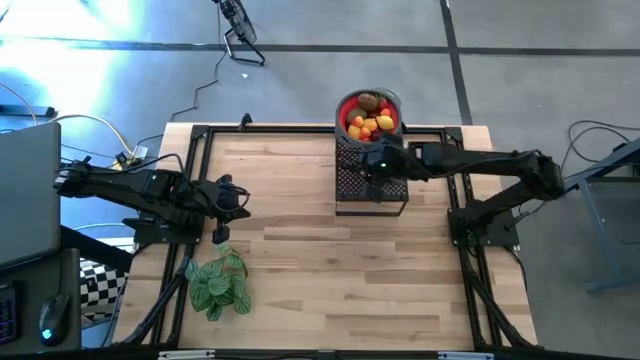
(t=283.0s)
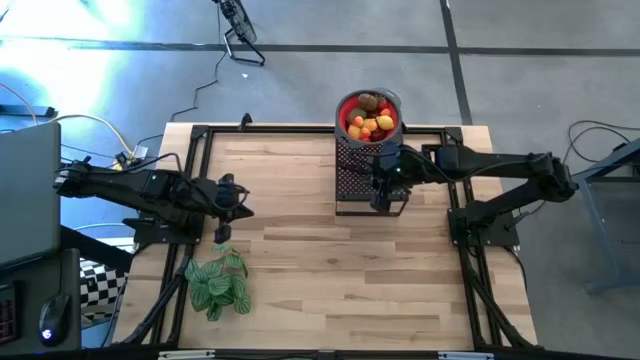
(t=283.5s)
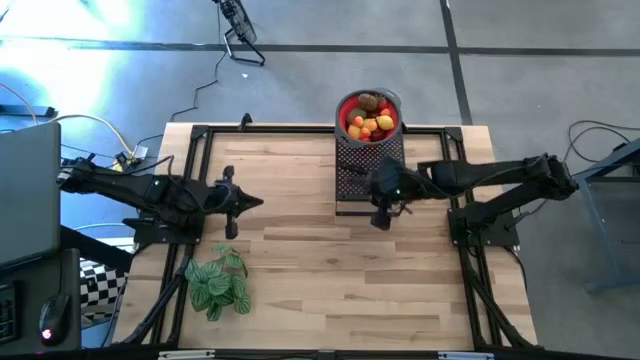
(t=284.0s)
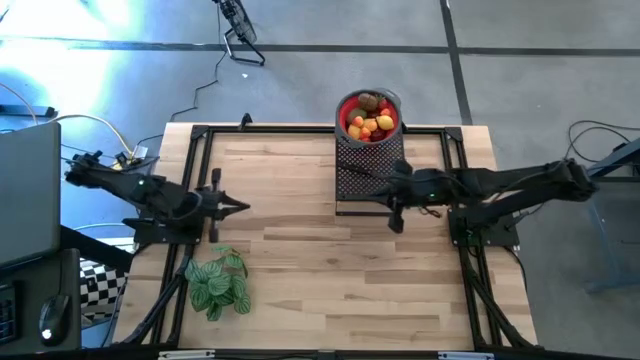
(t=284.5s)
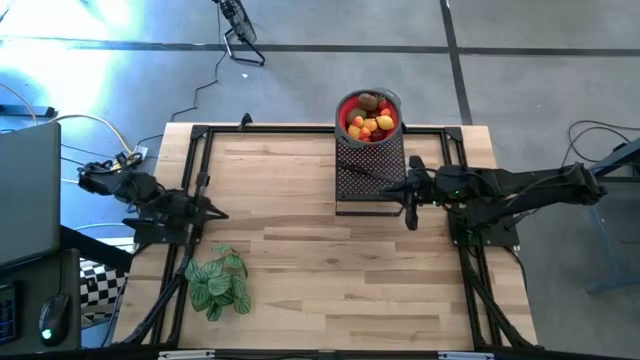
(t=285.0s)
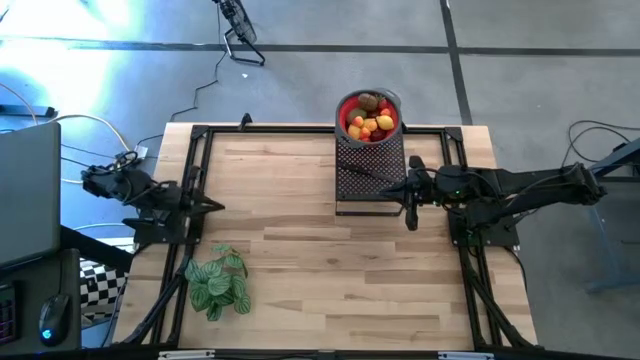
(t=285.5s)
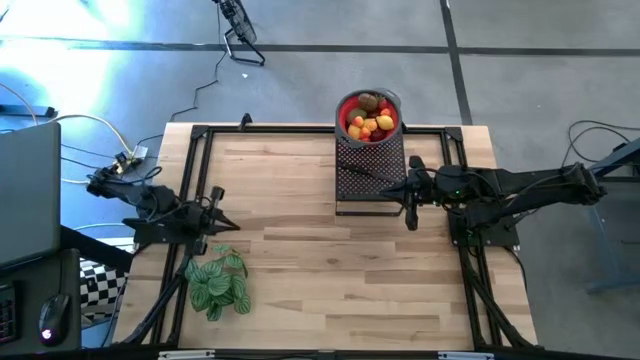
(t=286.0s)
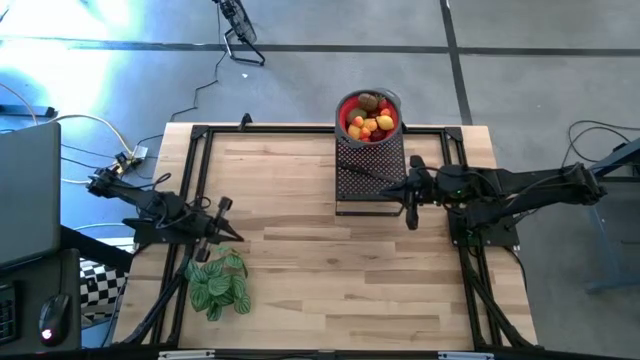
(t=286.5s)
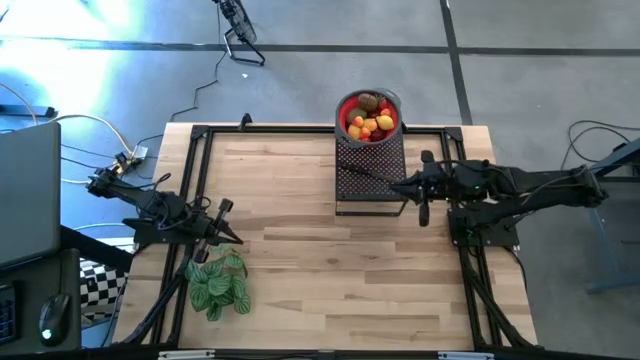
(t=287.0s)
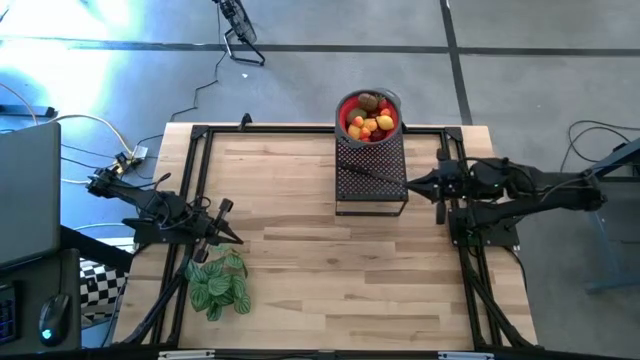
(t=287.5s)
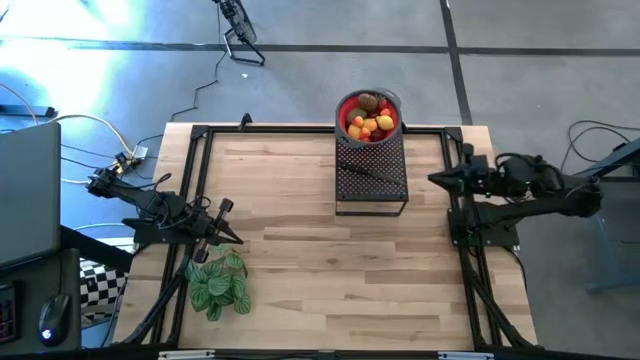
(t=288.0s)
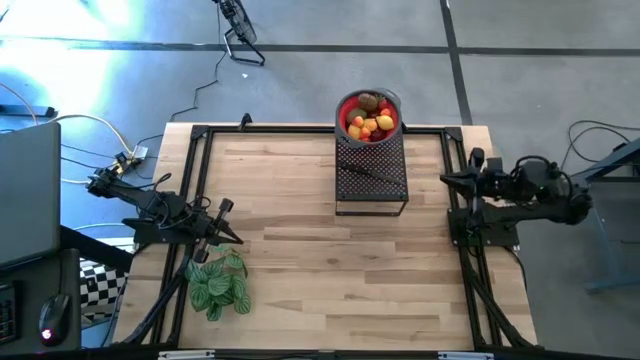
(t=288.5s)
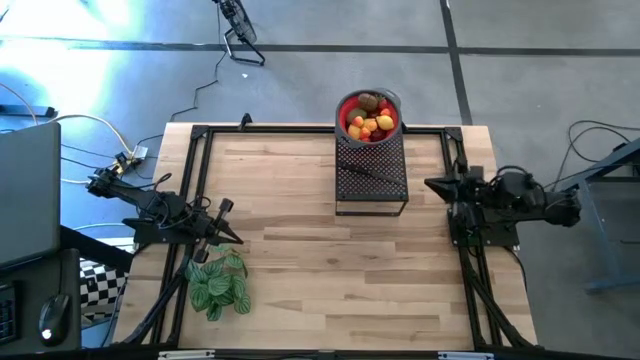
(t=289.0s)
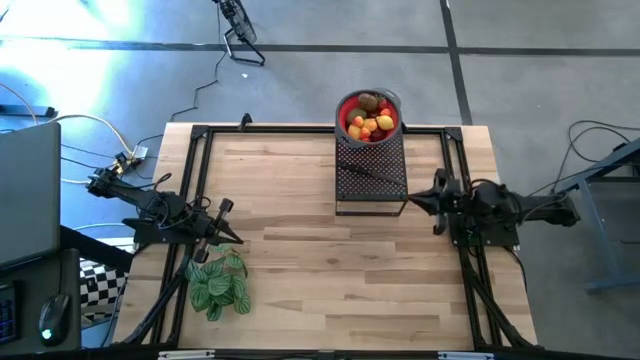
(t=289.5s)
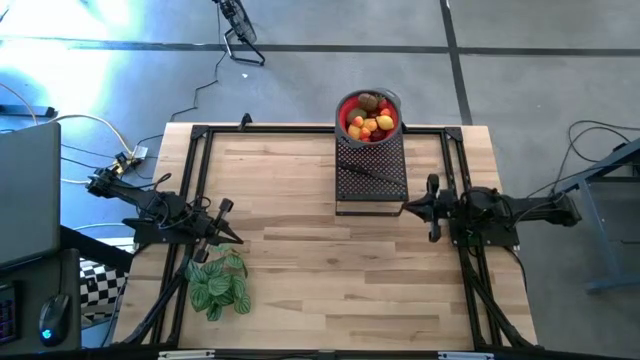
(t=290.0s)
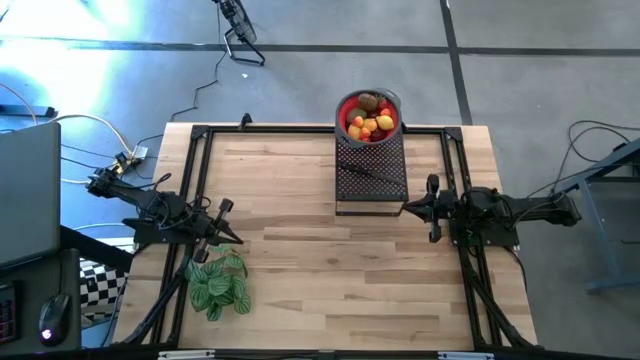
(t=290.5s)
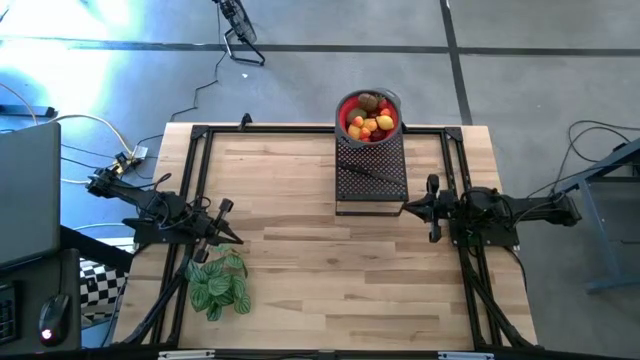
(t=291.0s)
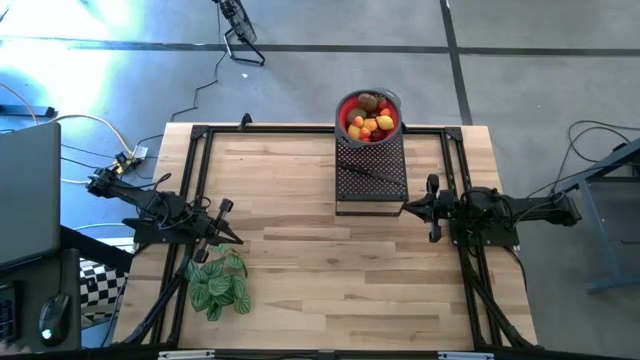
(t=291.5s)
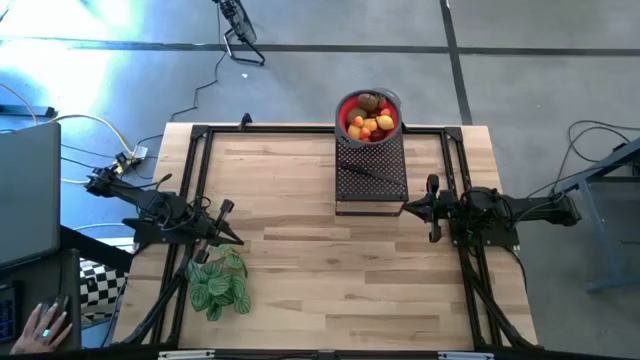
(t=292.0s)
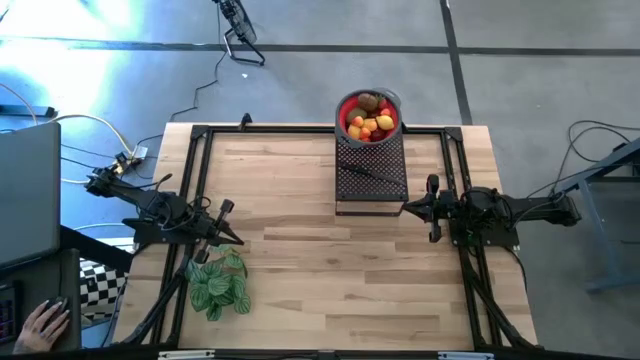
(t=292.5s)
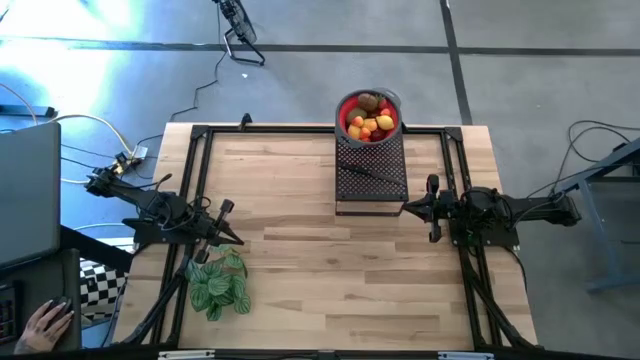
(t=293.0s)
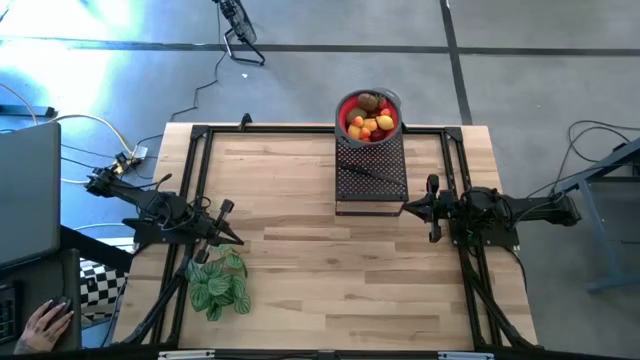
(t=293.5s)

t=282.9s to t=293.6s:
Task: Pick & Place Fruit
Return to Home Position

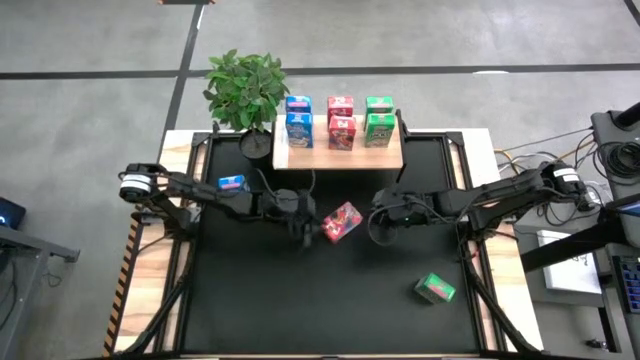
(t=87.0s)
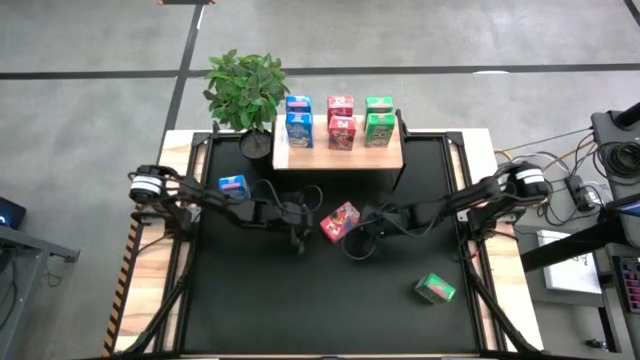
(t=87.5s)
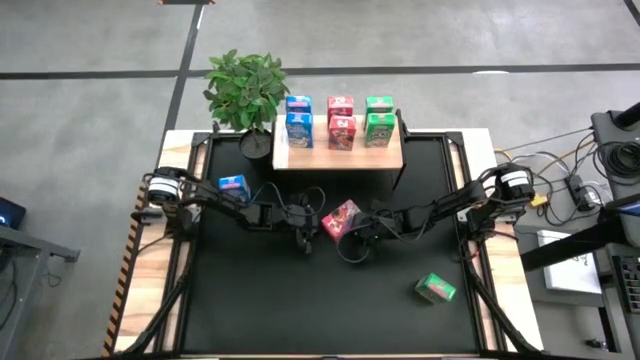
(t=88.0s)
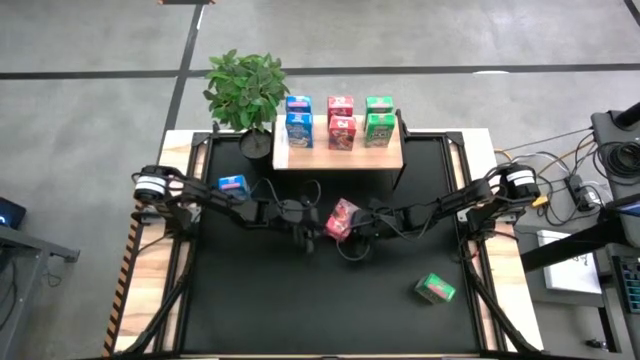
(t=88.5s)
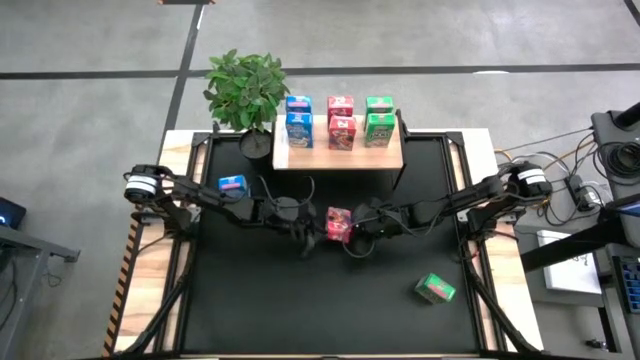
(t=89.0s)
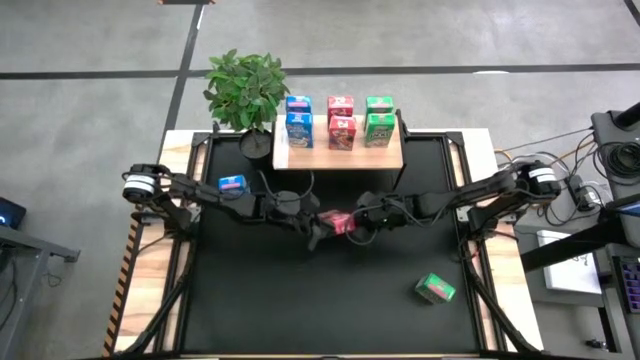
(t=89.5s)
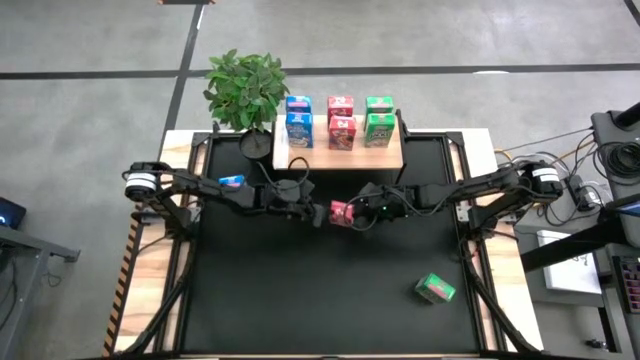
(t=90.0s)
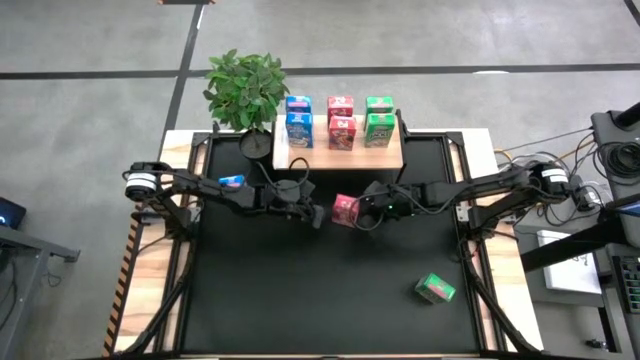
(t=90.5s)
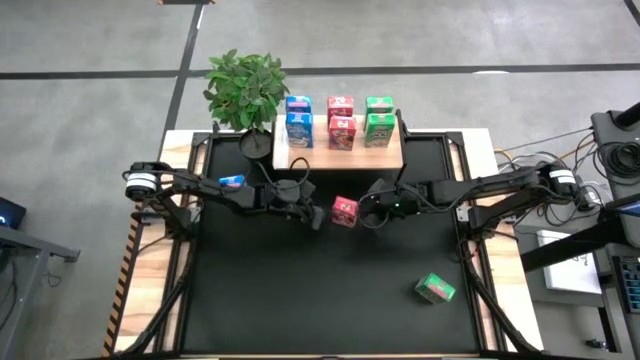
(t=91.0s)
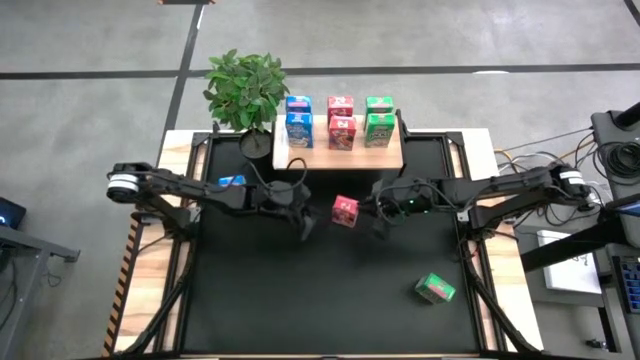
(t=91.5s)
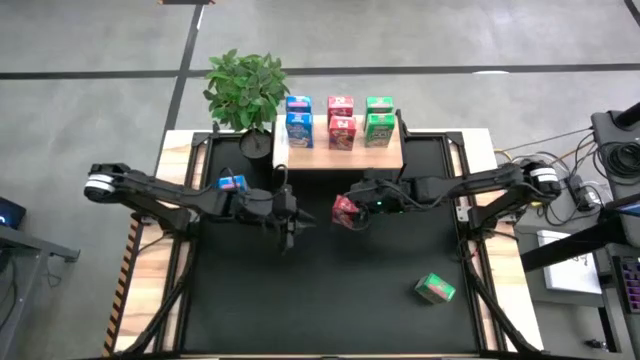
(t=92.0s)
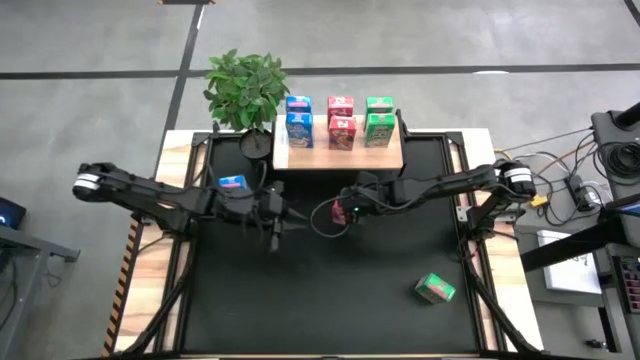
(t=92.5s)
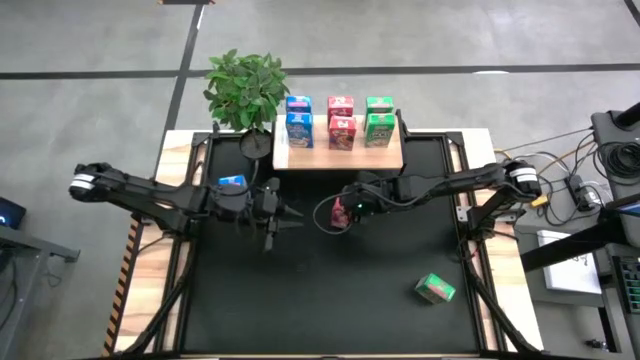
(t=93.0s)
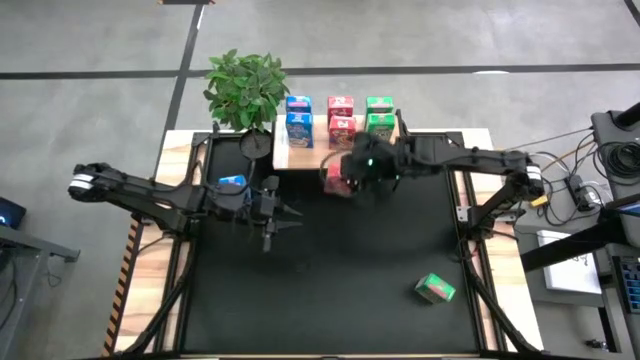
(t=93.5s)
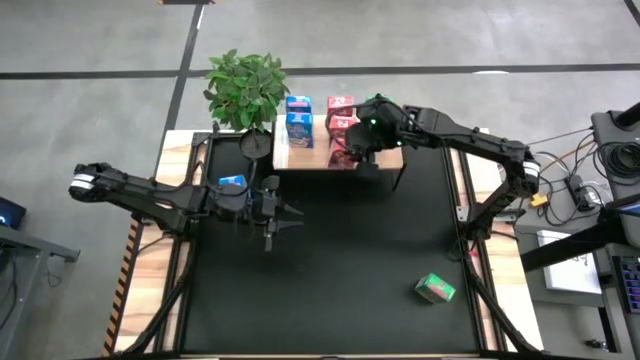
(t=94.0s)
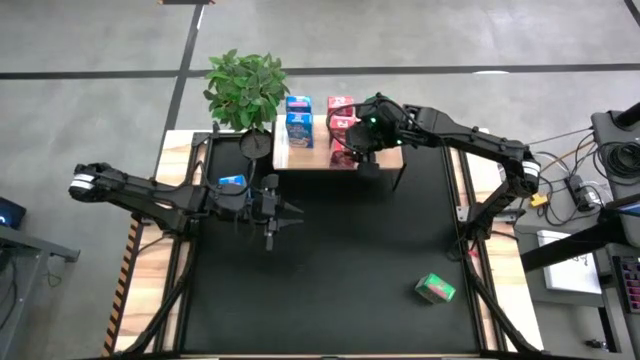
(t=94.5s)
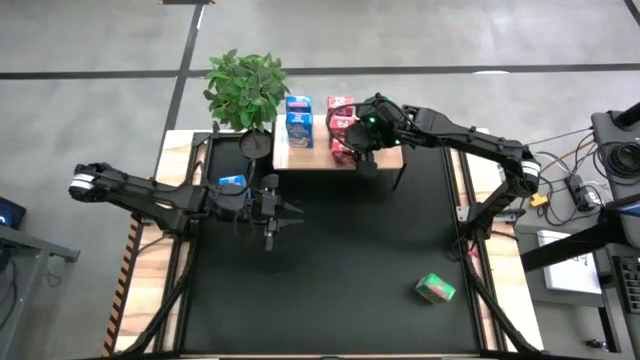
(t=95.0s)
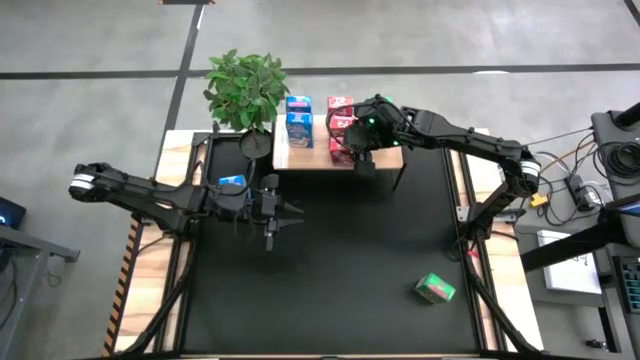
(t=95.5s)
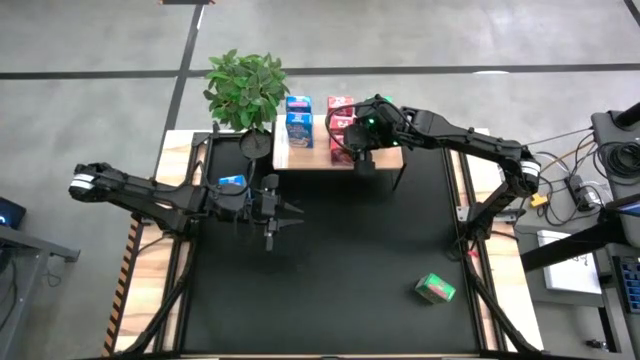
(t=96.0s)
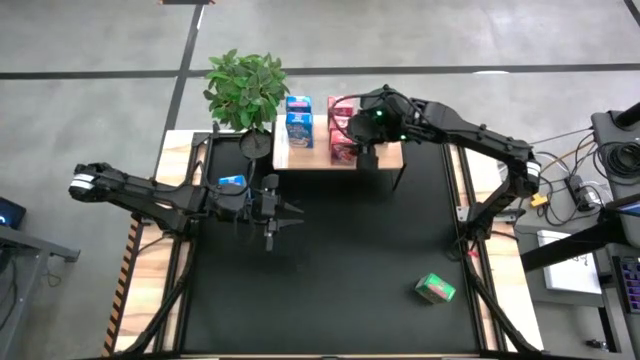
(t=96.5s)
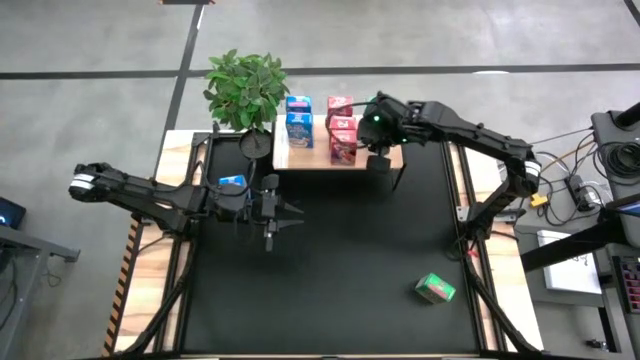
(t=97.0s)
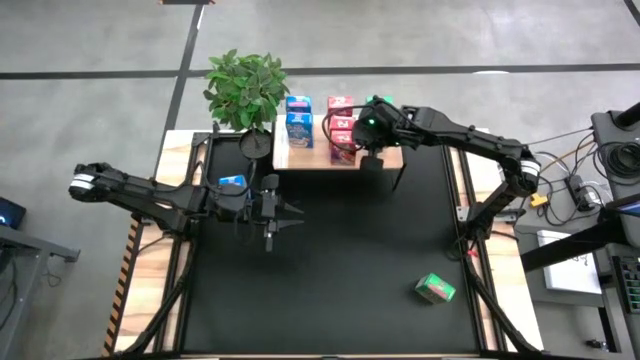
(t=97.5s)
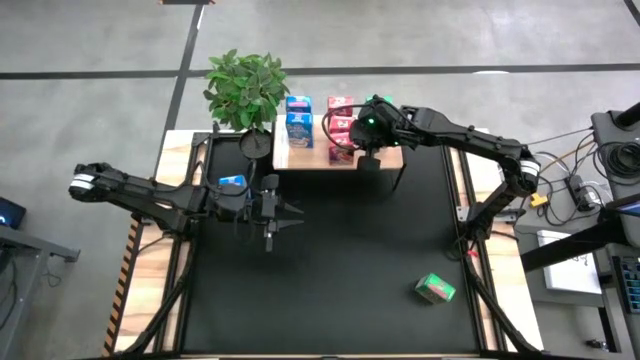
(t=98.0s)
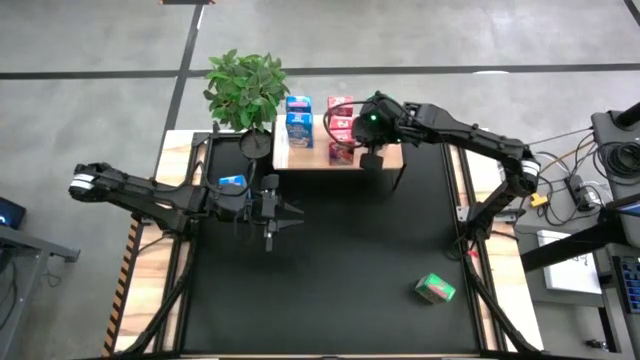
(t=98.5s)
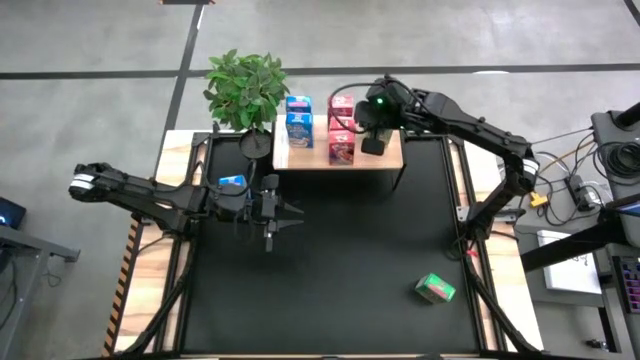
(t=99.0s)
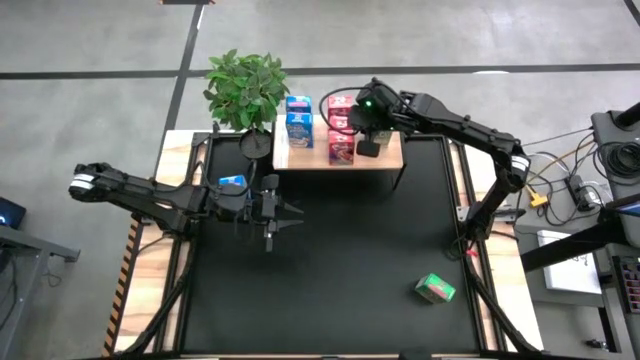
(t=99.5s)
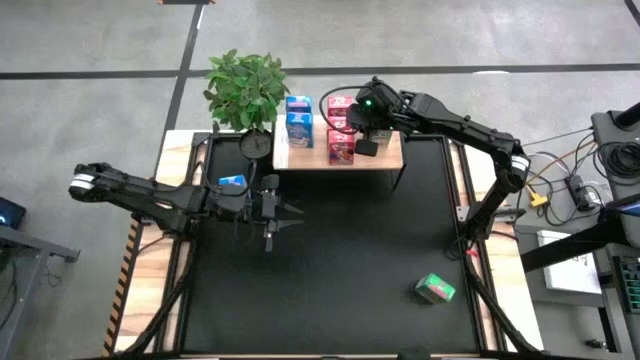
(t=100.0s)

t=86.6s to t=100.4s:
Task: Stack cereal on shelf
Put the red cereal box aligned with the other red cereal boxes on the shelf
